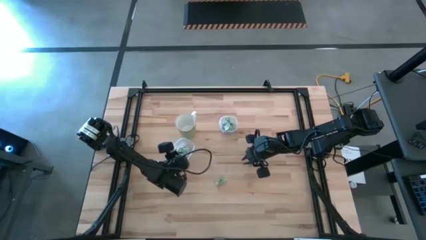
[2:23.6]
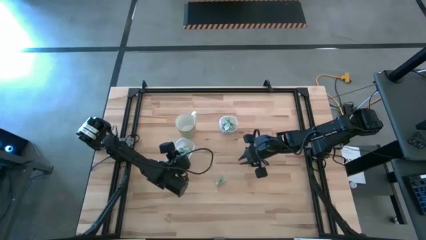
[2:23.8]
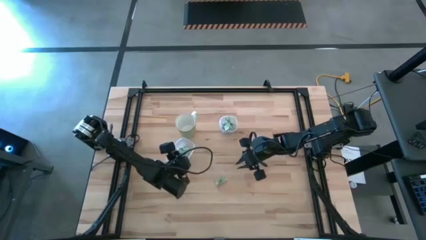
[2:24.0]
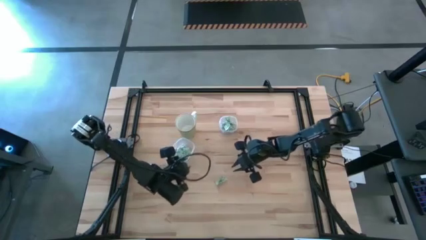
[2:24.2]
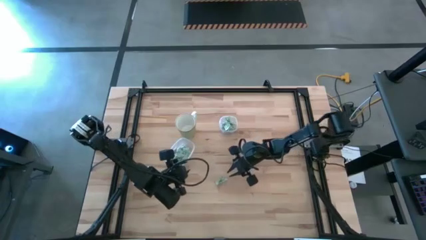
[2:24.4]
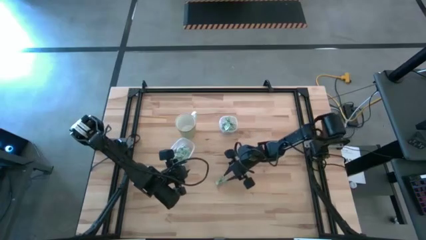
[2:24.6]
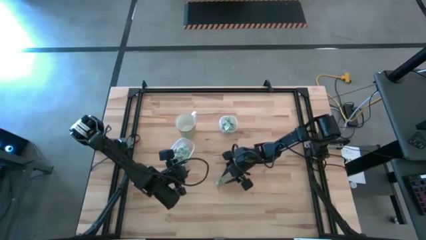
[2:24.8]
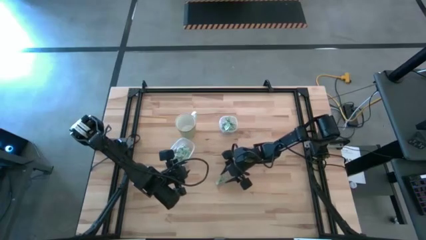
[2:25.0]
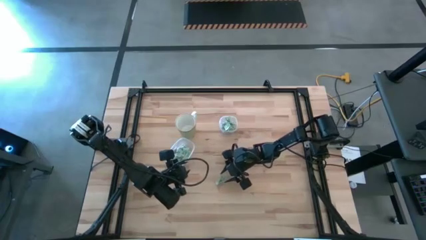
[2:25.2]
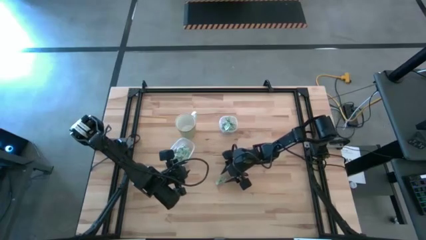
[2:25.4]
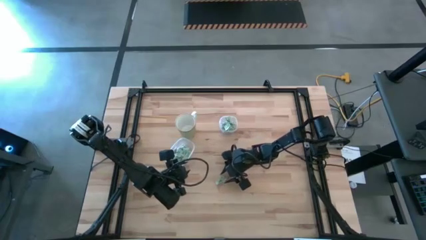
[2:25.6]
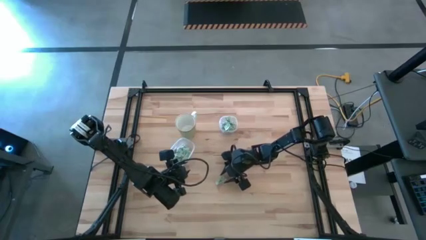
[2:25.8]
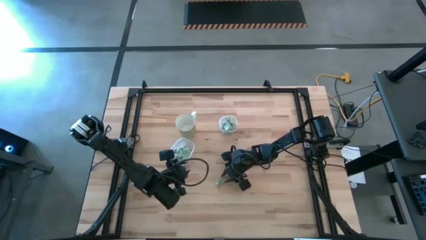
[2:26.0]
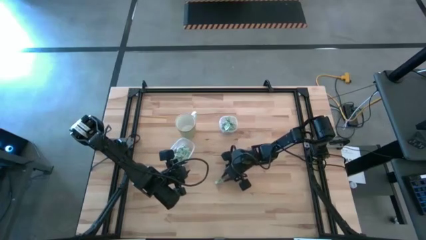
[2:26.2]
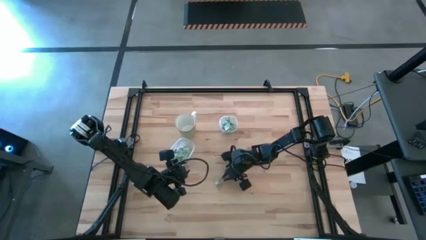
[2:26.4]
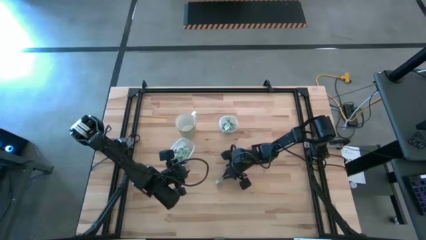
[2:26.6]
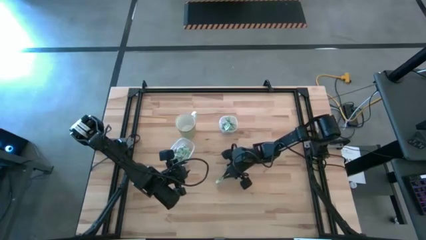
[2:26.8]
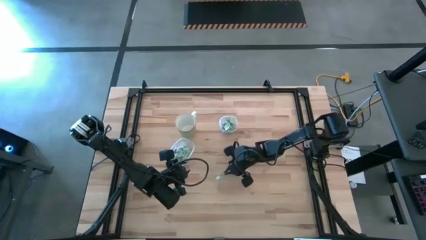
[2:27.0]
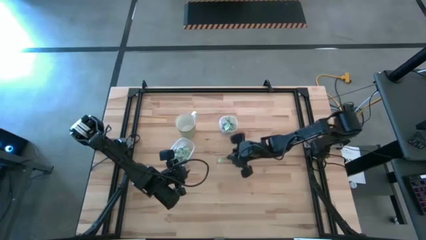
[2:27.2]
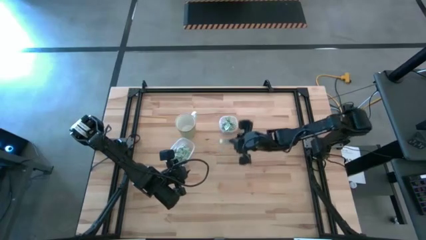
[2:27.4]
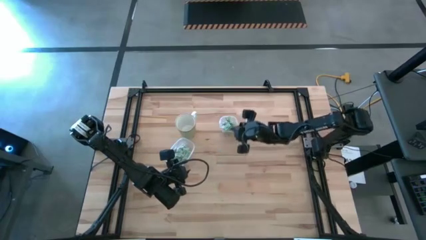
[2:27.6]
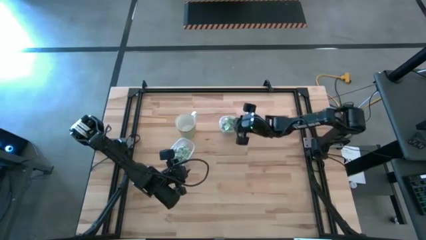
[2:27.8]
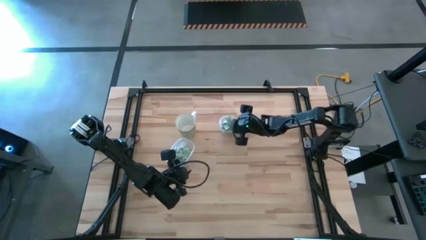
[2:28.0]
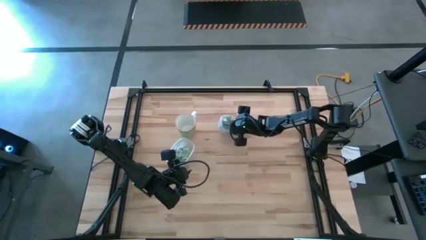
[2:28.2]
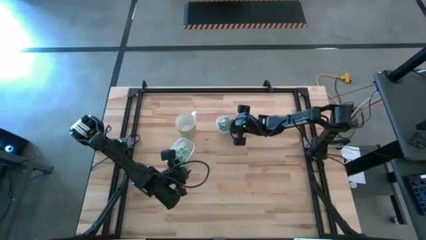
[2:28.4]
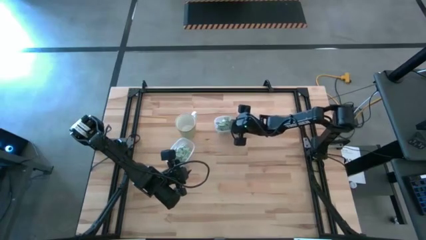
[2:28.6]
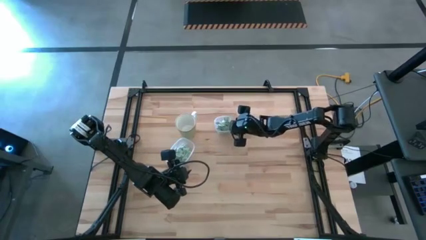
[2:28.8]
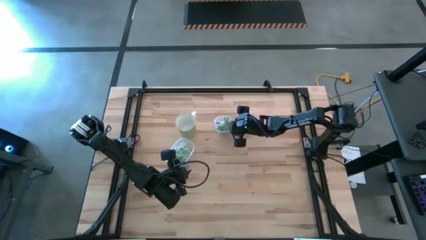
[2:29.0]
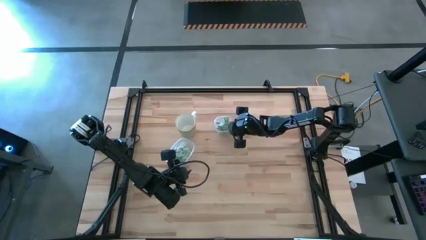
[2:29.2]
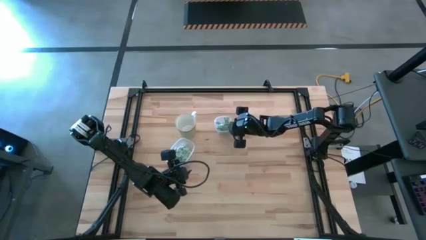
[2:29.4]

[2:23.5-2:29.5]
Task: Pick and place items into bin
Put the stevia packet into the top transparent bin

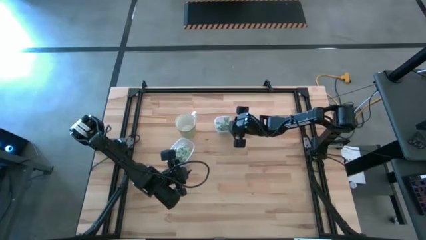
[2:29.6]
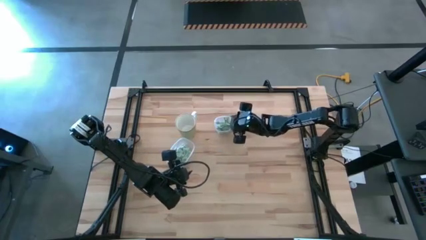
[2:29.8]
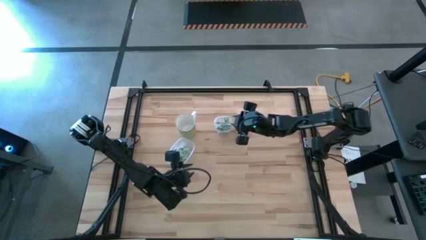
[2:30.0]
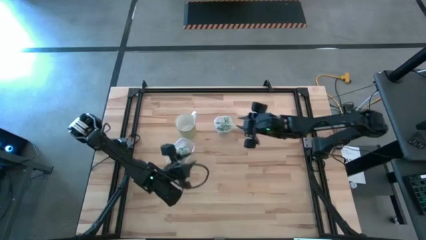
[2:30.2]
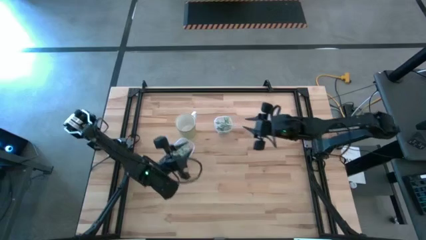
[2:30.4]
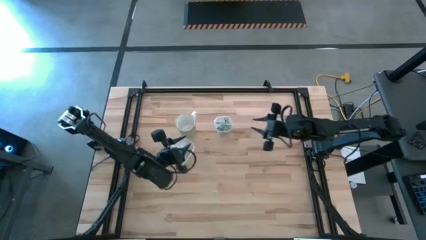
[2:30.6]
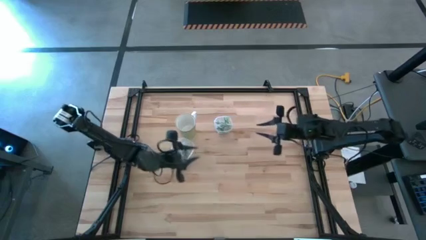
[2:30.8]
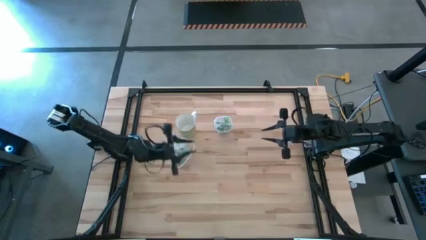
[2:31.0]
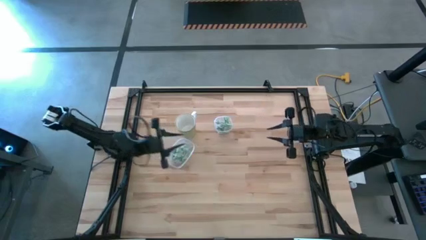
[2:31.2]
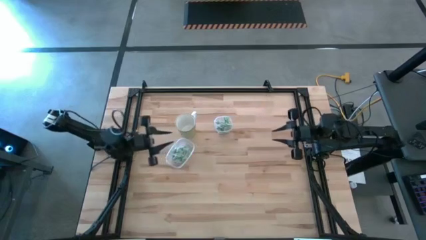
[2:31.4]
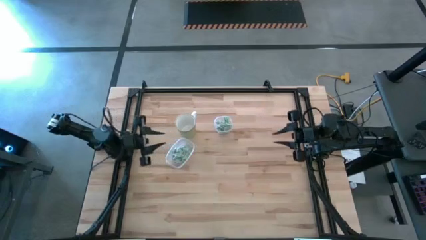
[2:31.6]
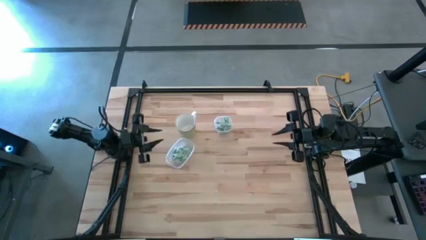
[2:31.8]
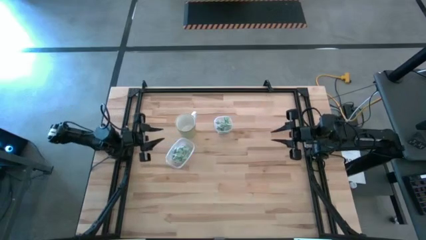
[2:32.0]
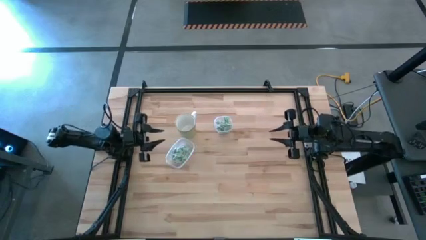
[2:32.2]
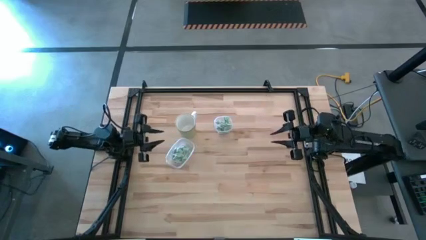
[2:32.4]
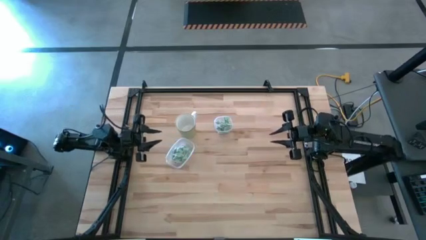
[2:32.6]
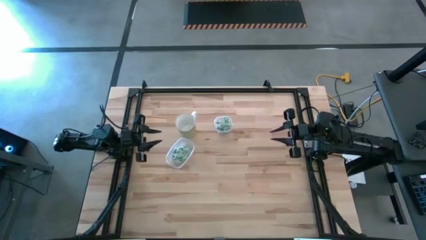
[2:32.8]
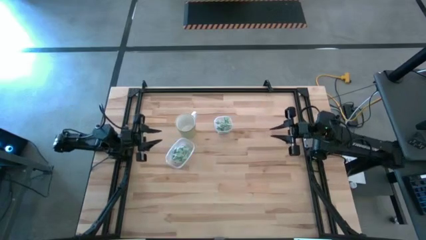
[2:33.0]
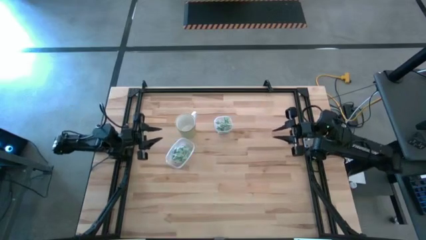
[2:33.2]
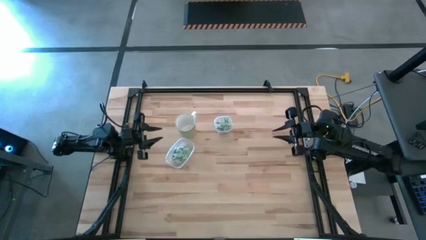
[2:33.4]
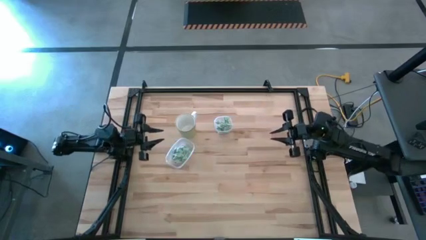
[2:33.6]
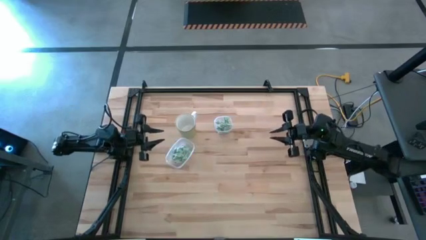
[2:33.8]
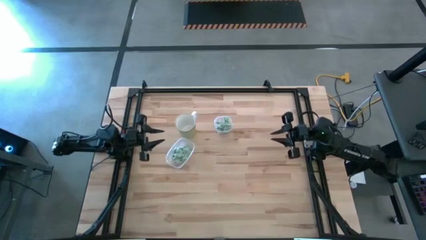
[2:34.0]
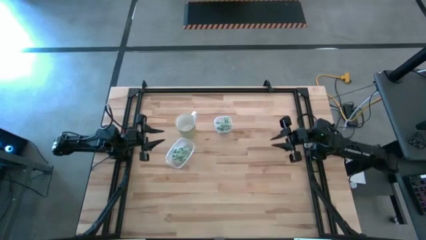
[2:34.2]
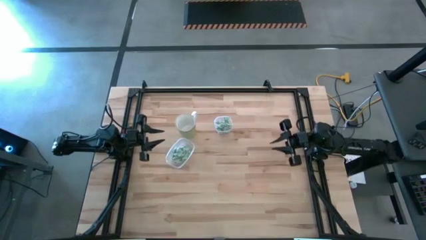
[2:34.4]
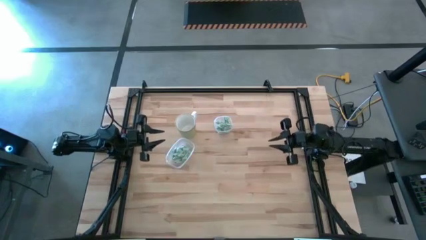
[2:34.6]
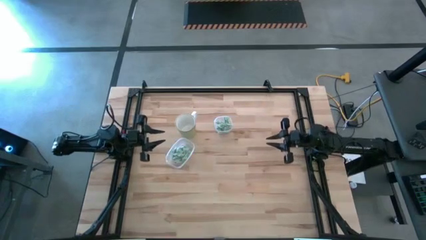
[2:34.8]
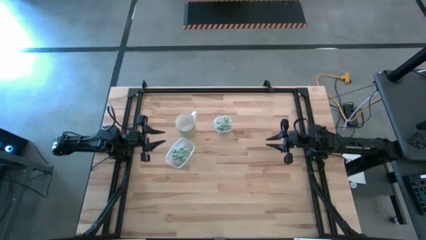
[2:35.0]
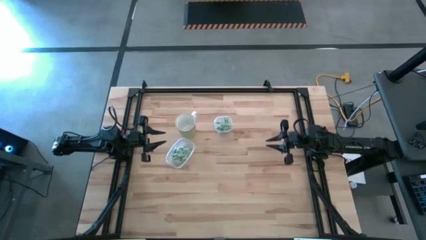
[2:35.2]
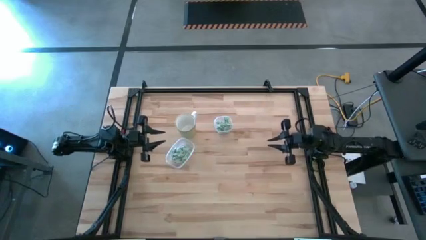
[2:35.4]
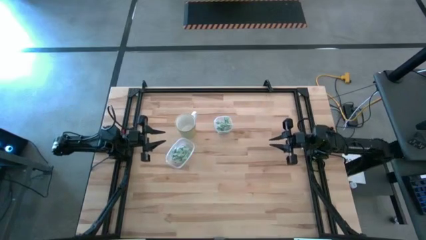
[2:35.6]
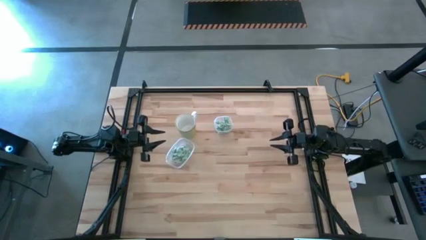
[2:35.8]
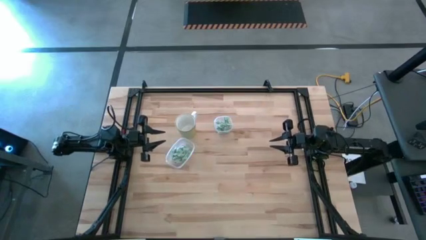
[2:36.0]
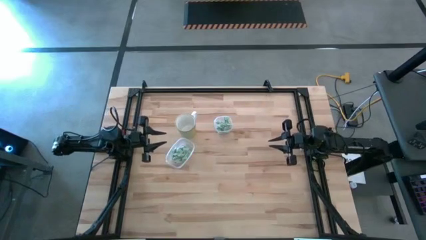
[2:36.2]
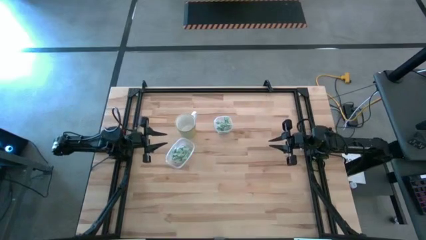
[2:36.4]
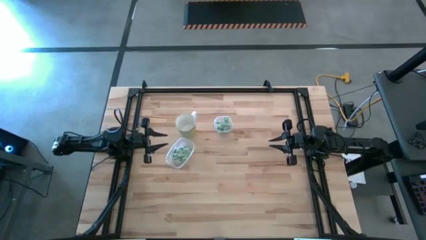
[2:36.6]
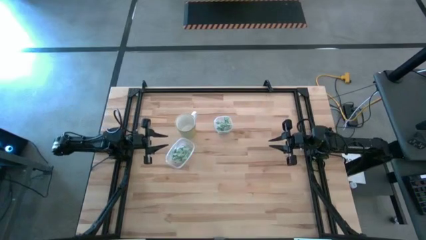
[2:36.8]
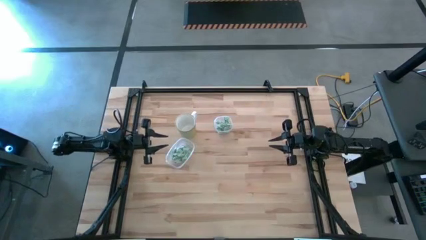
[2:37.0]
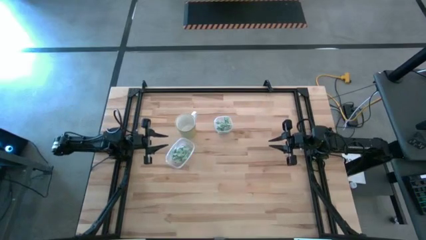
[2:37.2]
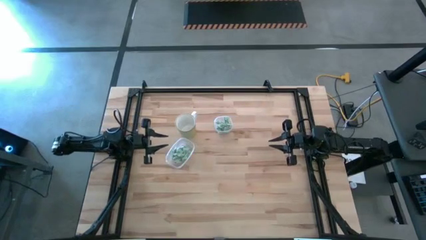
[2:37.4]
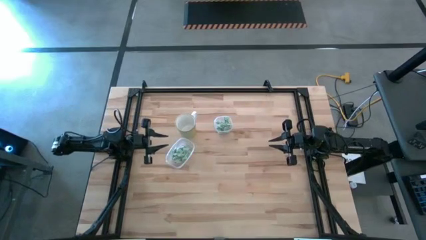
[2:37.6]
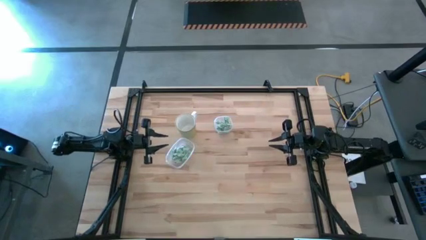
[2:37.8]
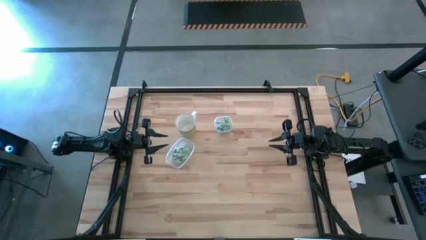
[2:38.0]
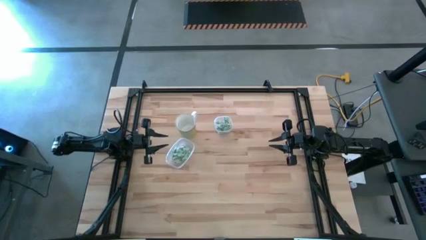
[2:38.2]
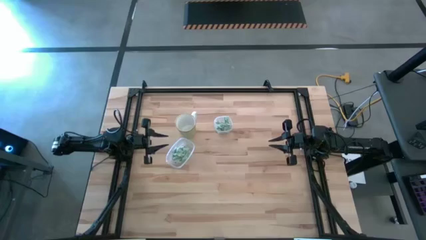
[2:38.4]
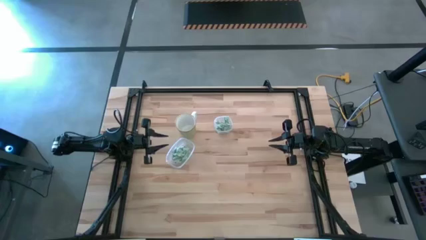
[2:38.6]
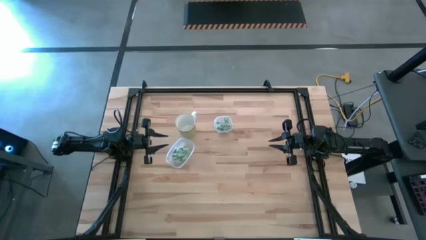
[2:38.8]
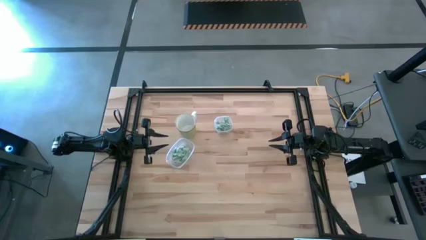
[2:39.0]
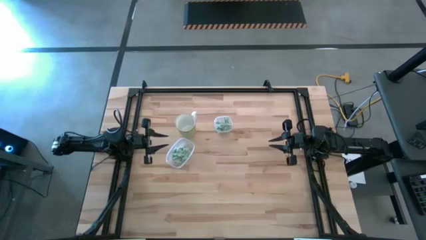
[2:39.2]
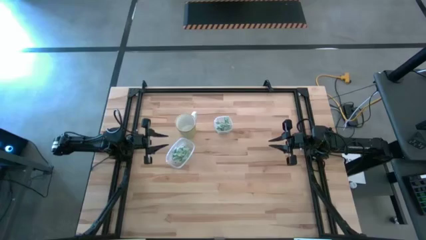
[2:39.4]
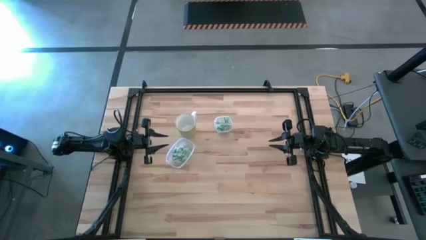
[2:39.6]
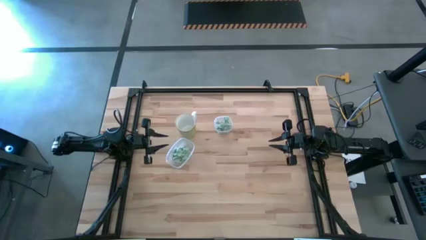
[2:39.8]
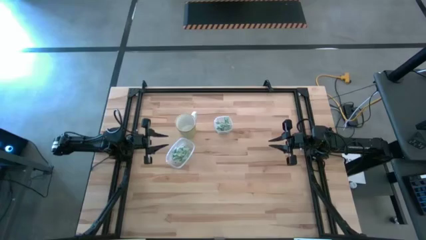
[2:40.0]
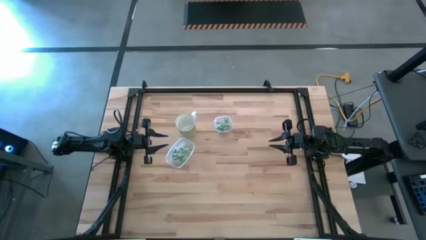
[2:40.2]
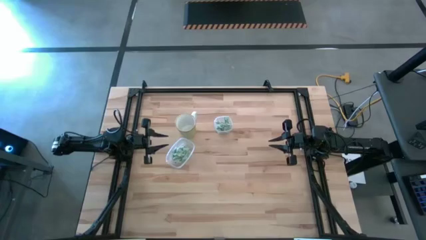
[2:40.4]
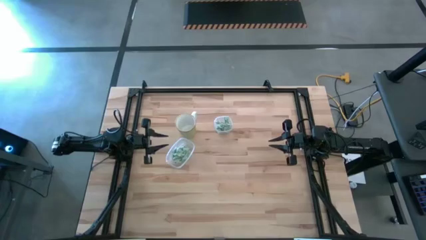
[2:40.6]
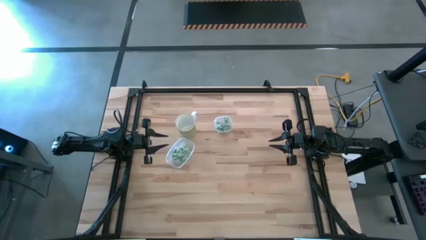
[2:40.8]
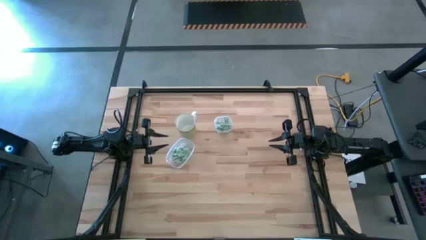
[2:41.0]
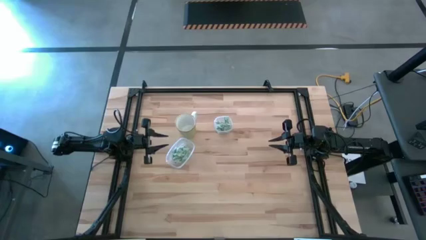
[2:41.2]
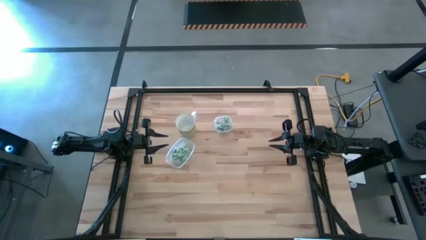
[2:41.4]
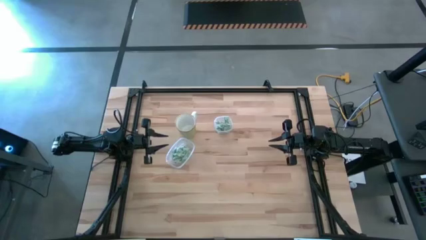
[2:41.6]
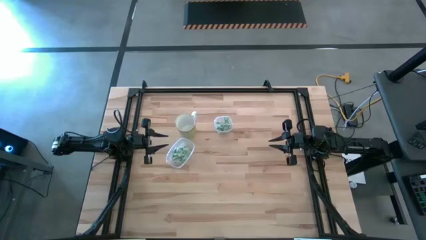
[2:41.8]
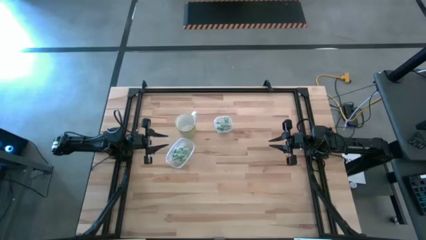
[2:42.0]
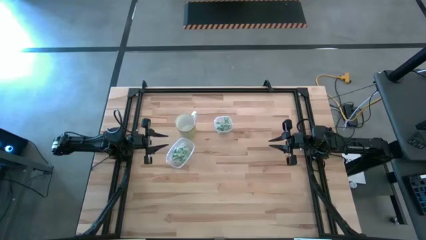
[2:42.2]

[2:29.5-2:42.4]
Return to Home Position
